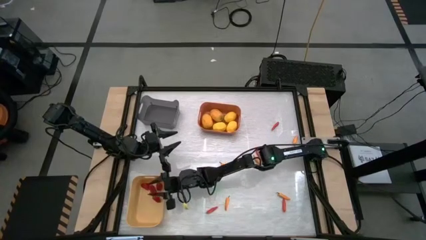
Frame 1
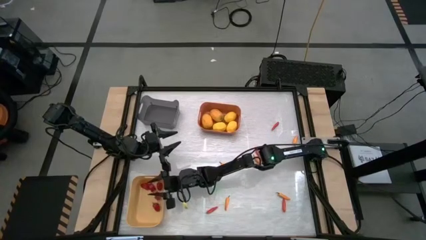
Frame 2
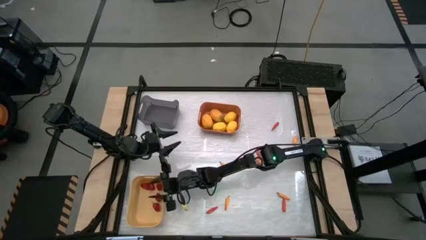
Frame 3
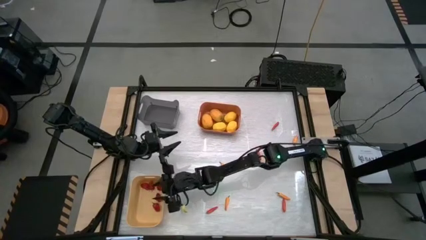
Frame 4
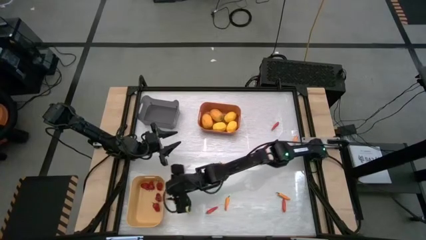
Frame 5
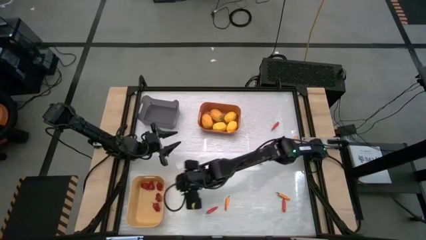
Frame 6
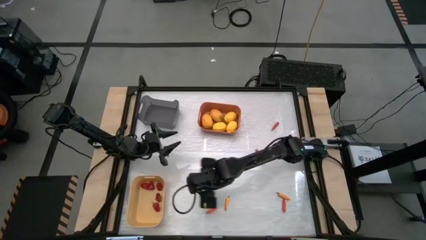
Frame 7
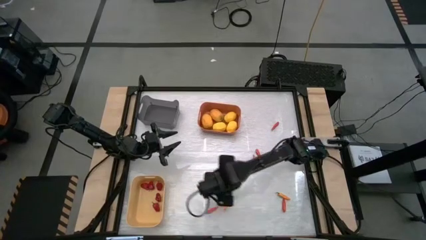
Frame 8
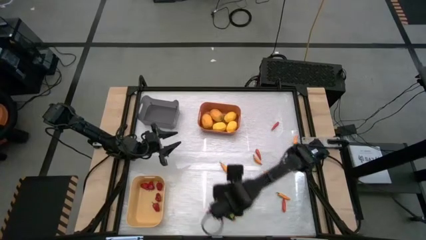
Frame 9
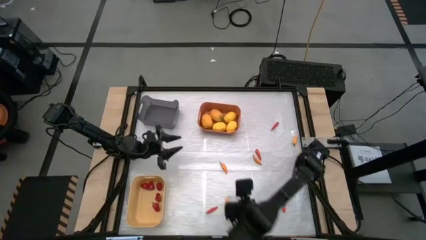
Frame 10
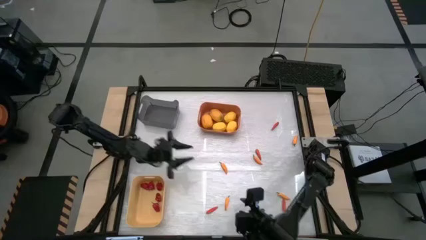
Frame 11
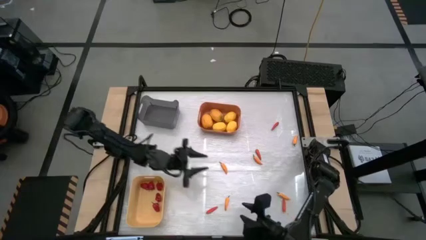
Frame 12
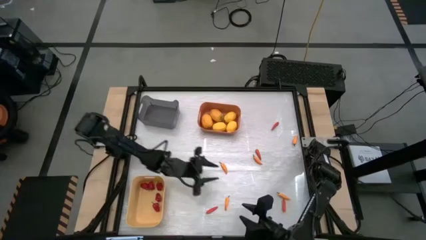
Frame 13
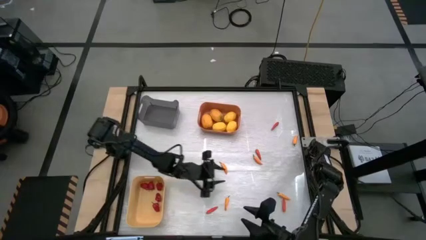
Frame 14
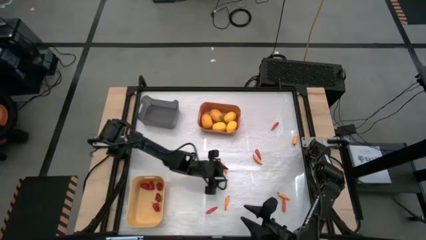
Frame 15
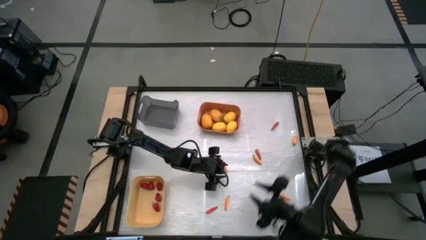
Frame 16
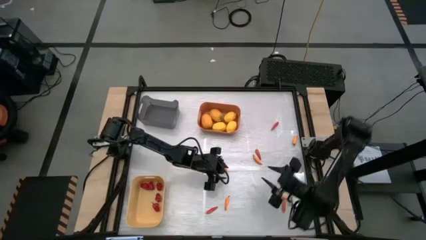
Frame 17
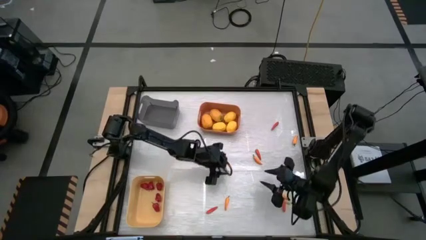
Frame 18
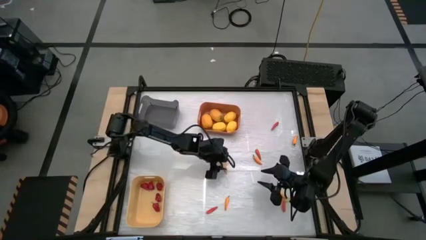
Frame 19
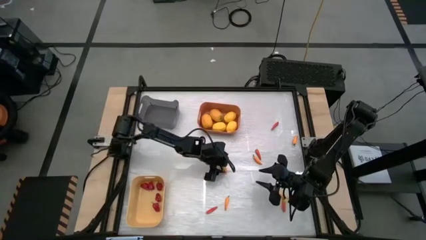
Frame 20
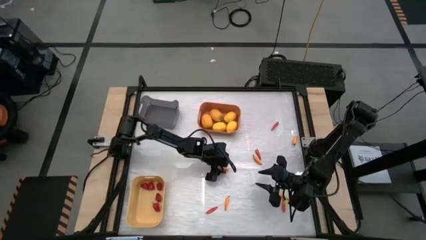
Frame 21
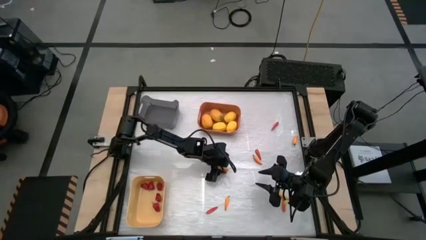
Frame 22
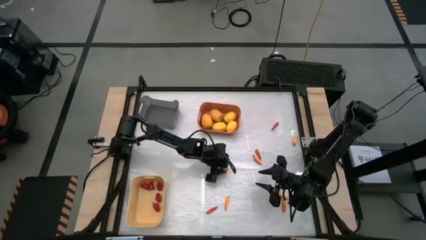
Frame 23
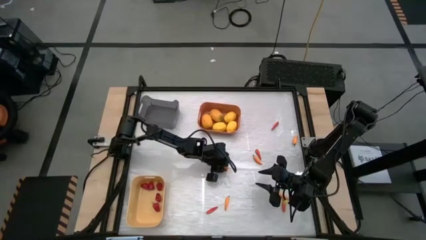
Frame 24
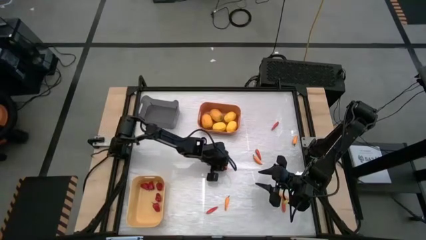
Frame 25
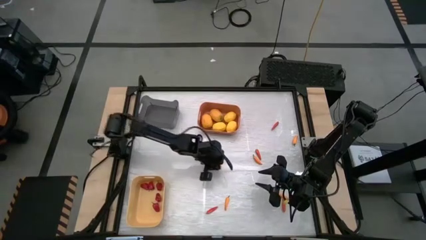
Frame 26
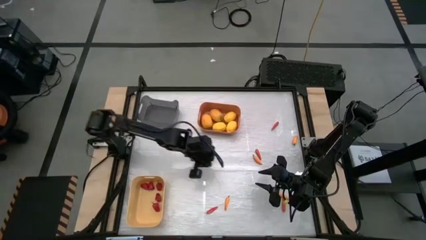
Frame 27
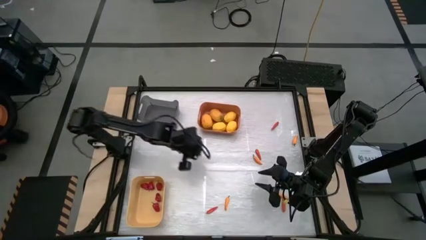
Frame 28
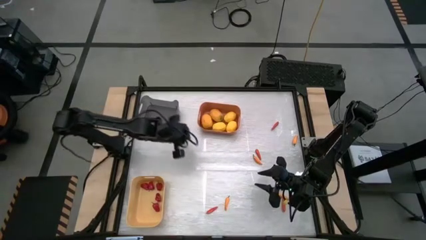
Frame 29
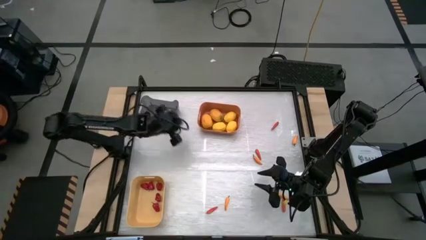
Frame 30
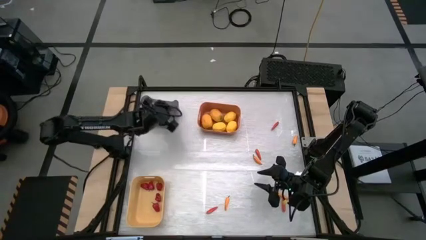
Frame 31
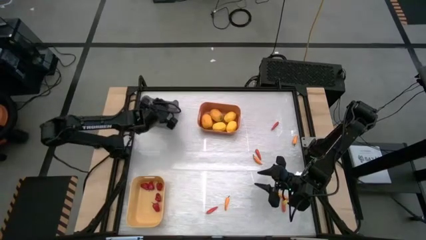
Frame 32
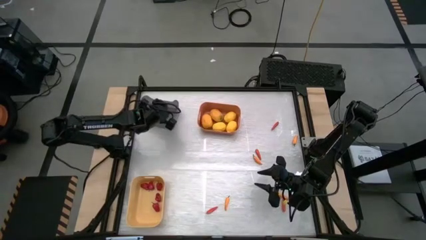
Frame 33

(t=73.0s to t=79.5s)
Task: Sort produce into baskets
Put the yellow chili pepper into the black bin

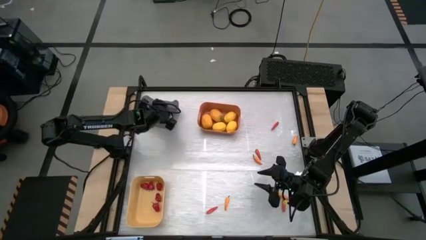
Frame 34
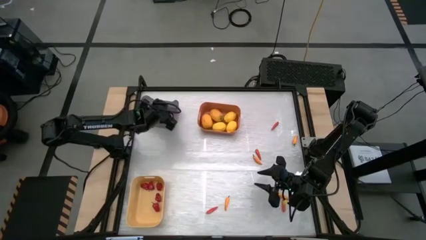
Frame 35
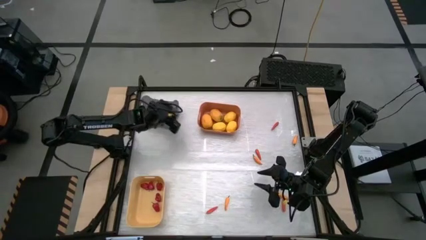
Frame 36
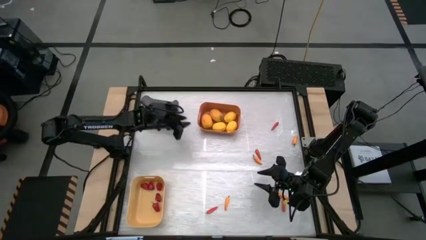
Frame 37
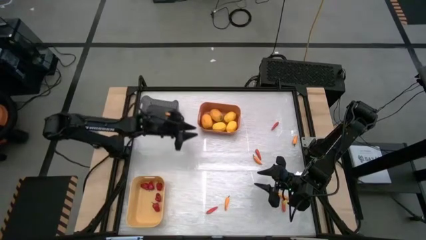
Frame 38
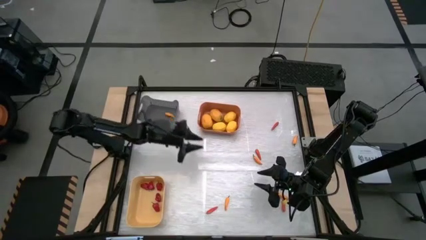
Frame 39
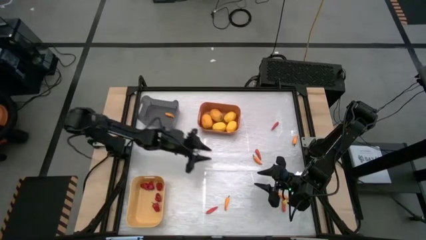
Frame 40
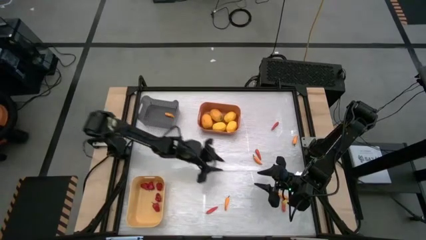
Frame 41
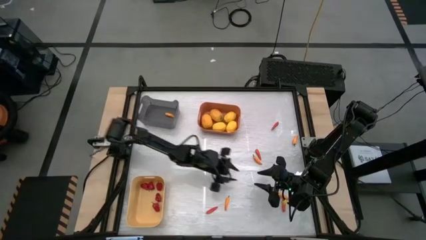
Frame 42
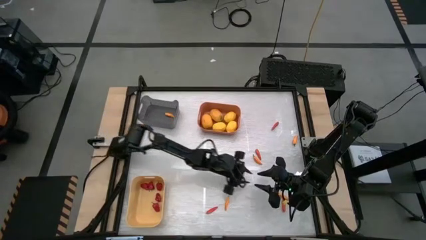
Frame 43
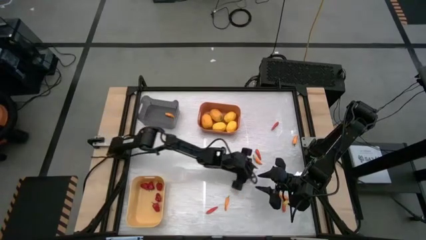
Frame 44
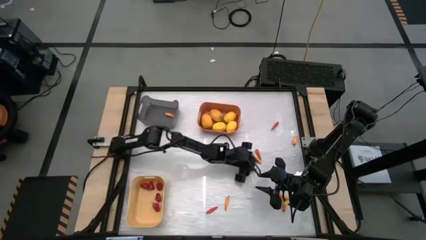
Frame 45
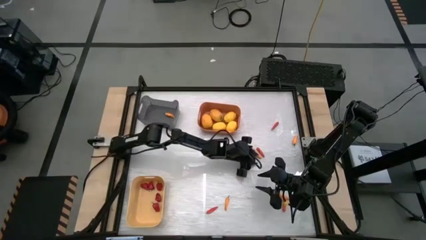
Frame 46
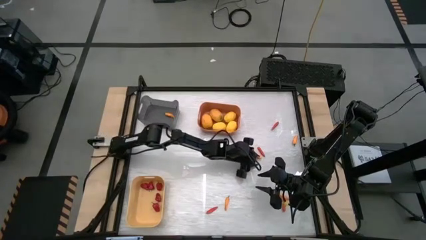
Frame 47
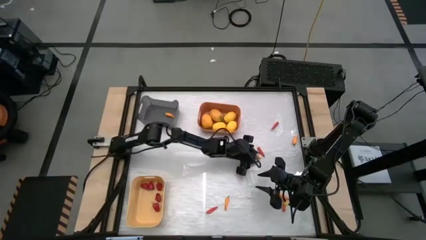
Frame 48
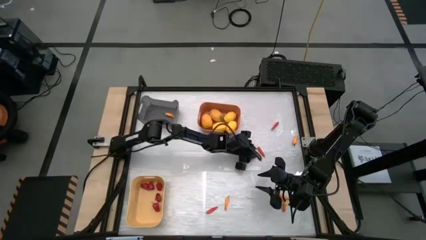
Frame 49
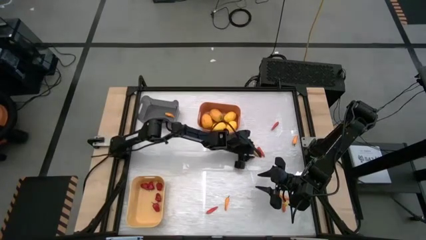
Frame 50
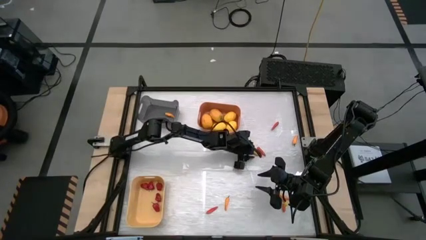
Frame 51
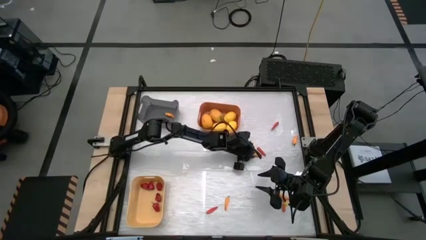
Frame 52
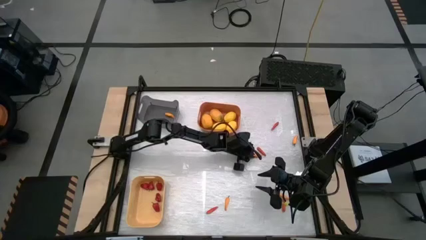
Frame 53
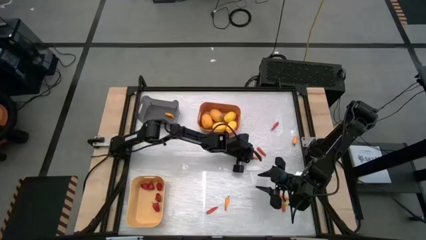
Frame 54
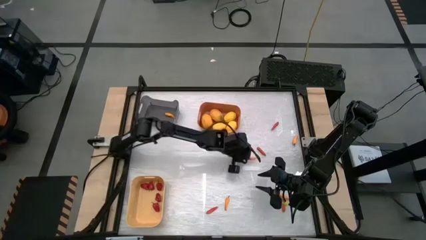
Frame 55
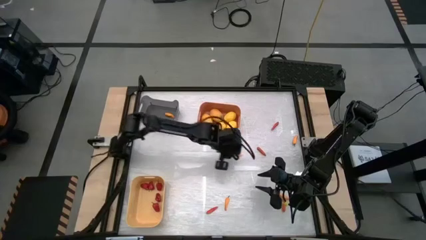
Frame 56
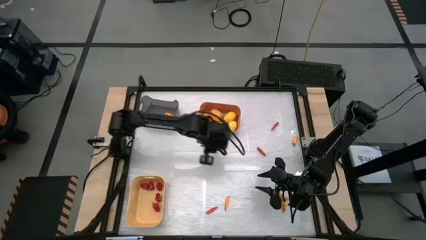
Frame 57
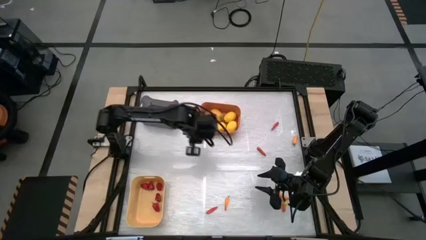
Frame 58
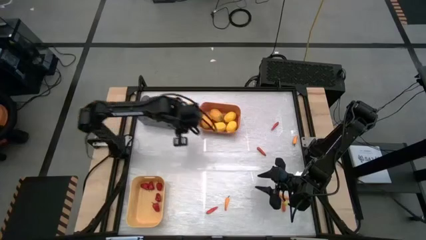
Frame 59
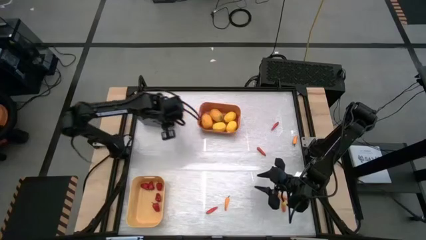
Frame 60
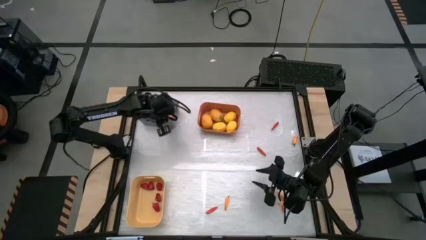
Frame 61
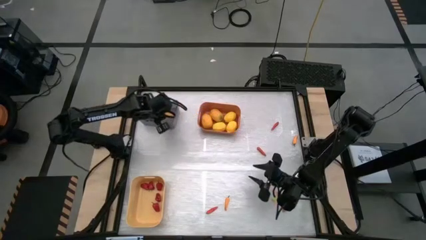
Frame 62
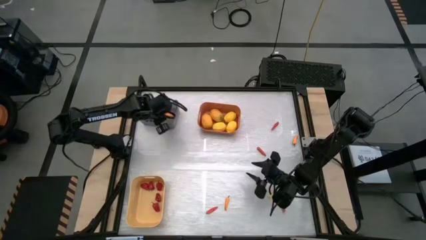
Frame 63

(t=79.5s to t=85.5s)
Put the yellow chili pepper into the black bin

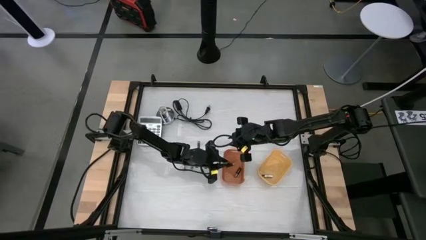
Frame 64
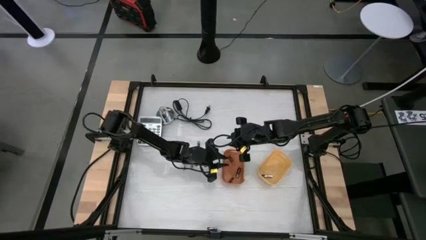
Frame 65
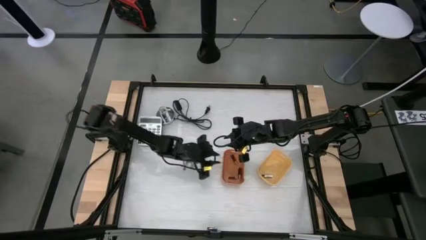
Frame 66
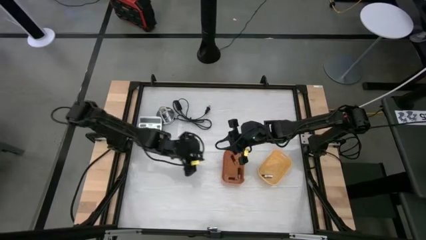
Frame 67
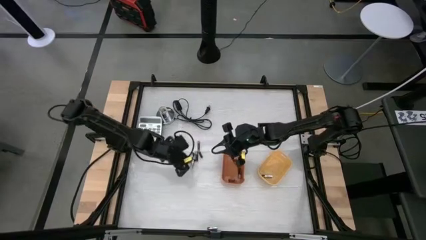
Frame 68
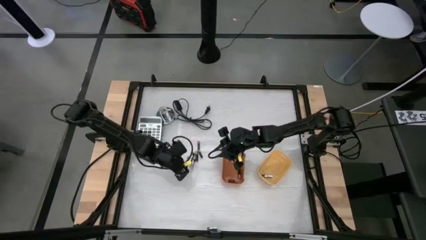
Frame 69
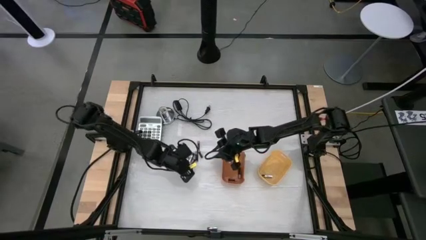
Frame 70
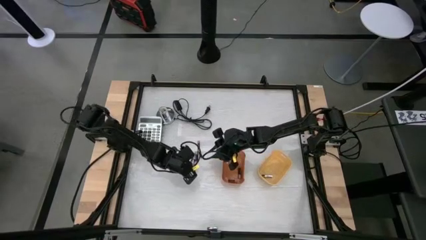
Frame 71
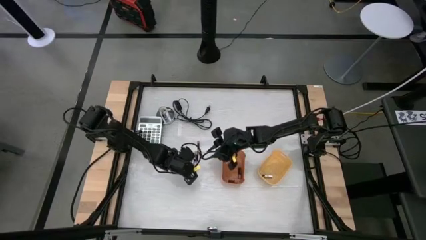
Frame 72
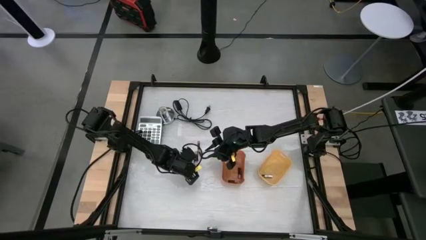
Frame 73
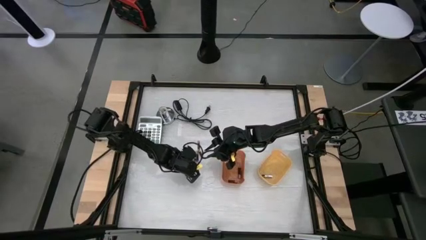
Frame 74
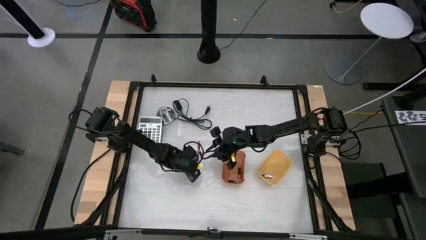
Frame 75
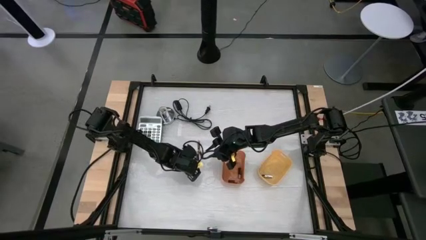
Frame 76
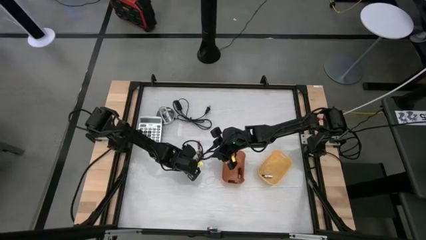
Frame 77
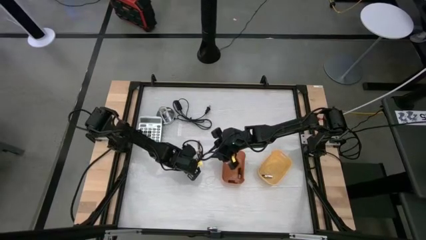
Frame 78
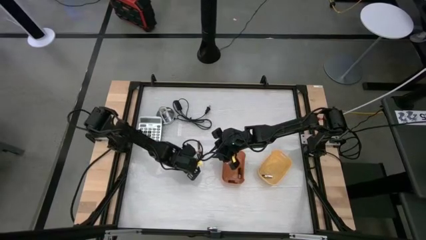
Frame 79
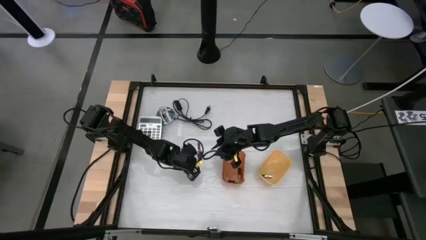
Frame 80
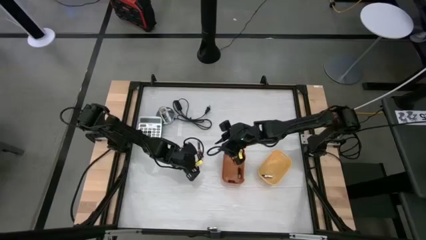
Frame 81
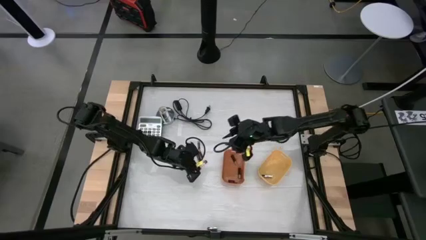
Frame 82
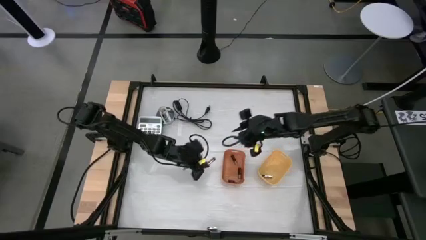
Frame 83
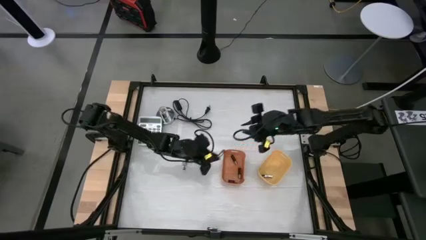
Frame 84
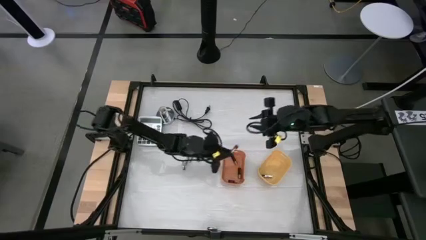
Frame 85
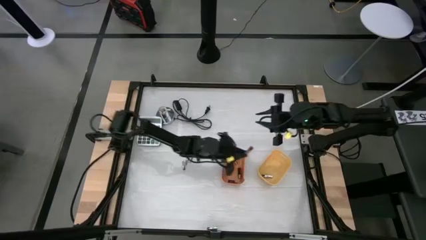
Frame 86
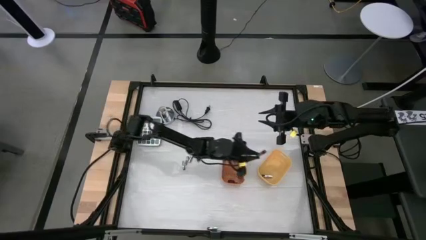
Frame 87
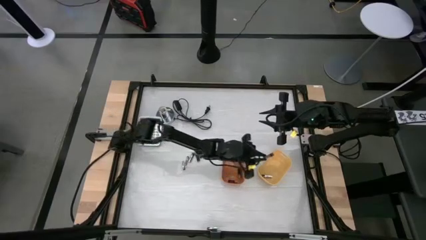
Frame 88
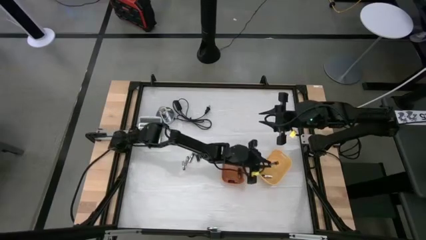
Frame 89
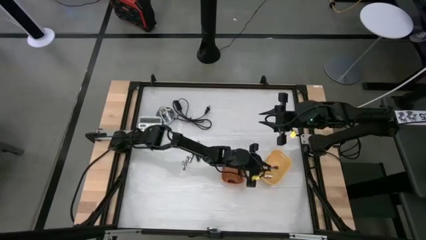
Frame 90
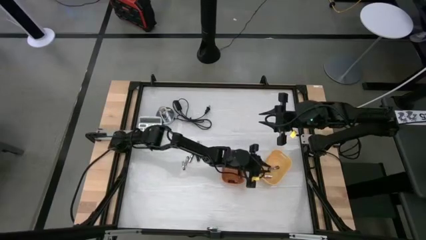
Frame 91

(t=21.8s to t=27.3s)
Task: Sort batteries
Put the silver battery into the yellow bin
